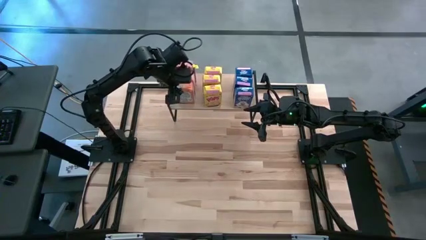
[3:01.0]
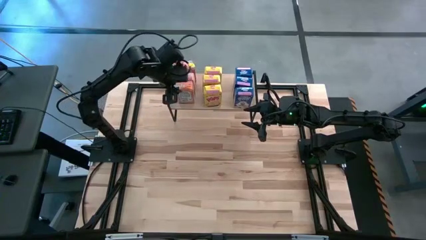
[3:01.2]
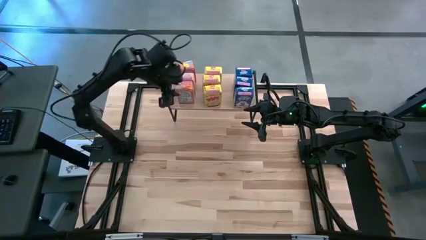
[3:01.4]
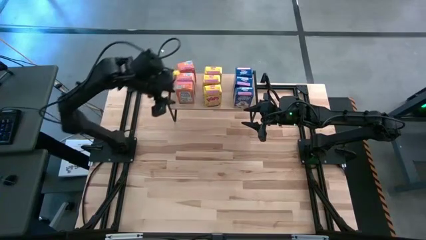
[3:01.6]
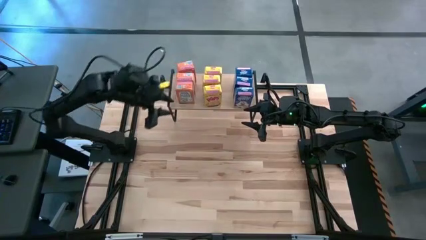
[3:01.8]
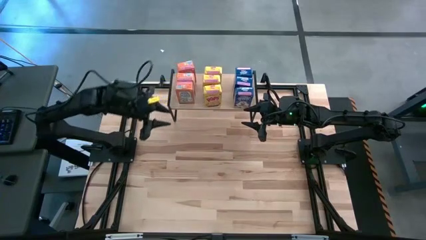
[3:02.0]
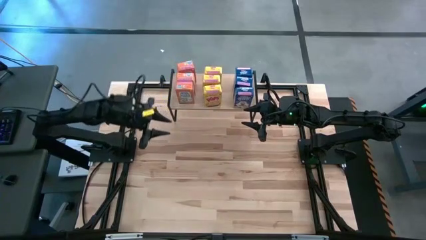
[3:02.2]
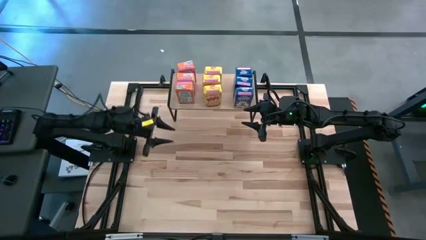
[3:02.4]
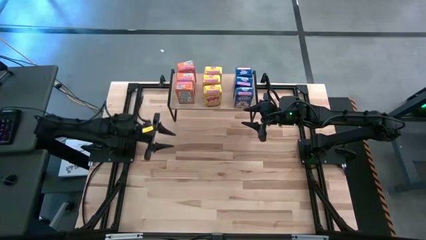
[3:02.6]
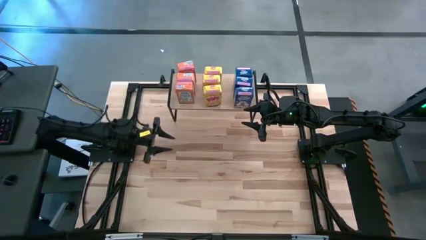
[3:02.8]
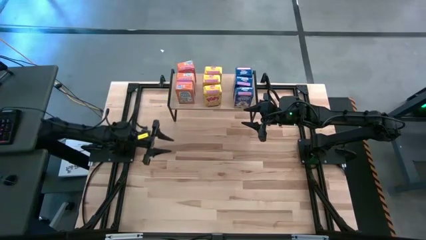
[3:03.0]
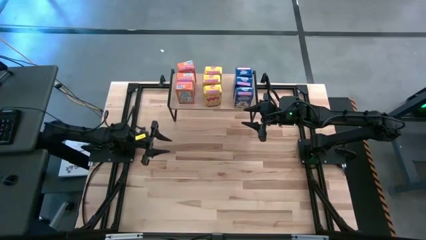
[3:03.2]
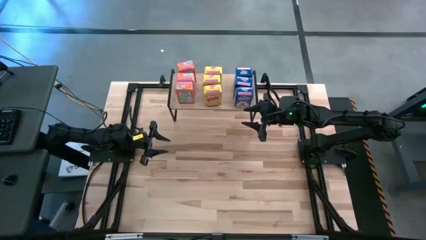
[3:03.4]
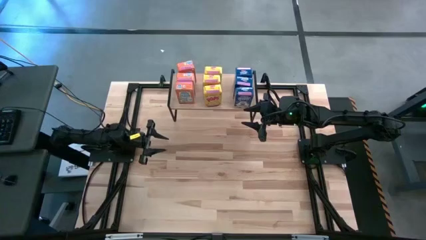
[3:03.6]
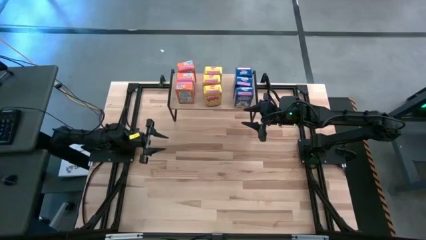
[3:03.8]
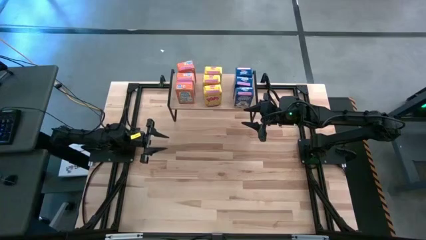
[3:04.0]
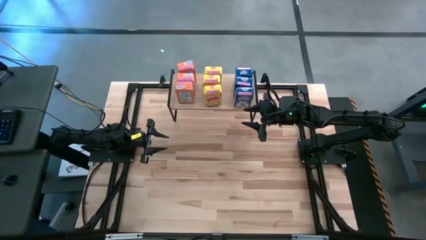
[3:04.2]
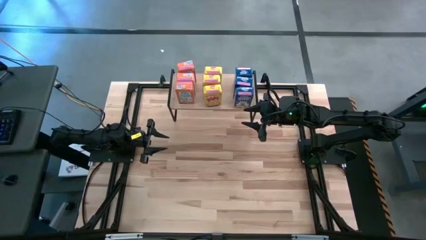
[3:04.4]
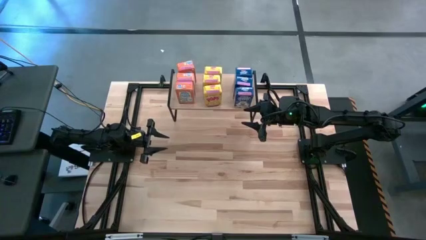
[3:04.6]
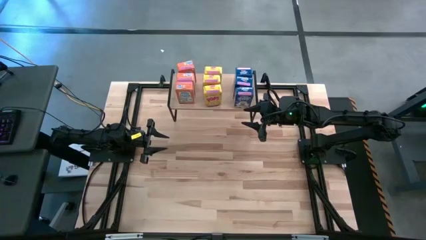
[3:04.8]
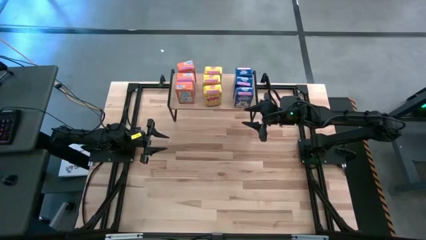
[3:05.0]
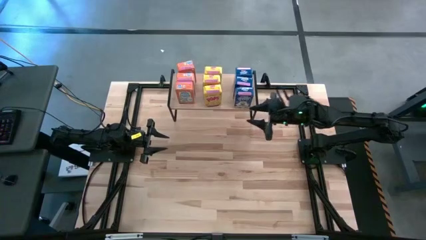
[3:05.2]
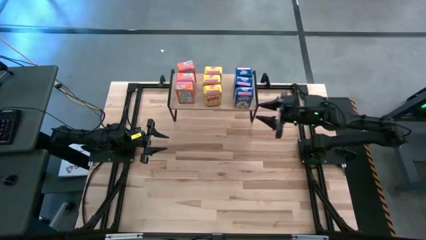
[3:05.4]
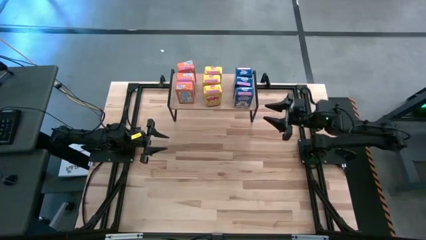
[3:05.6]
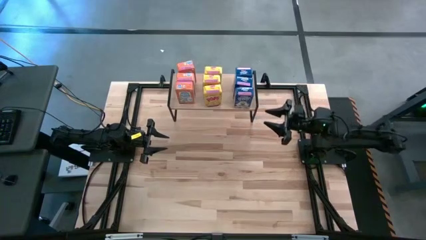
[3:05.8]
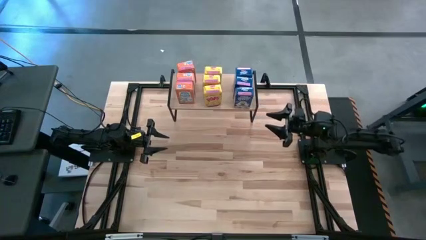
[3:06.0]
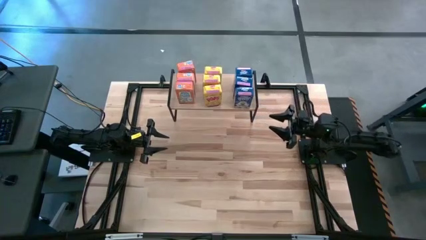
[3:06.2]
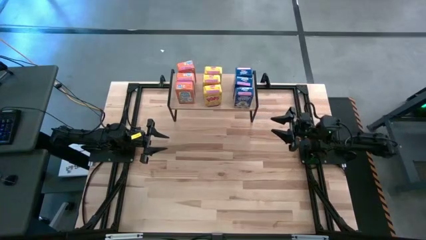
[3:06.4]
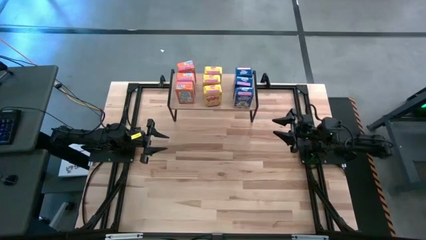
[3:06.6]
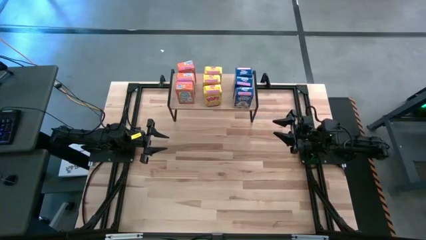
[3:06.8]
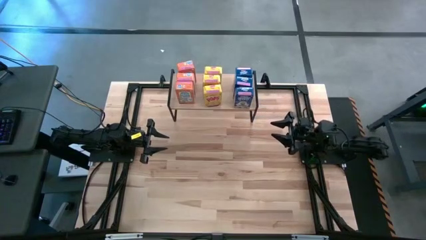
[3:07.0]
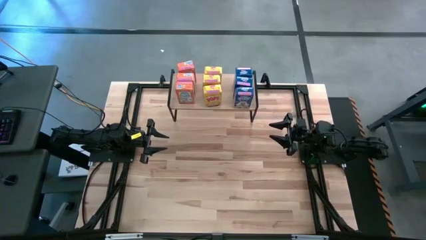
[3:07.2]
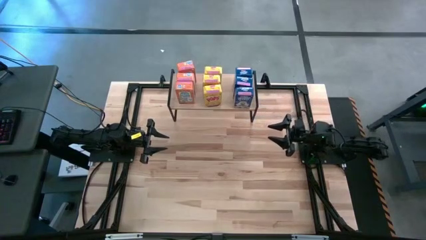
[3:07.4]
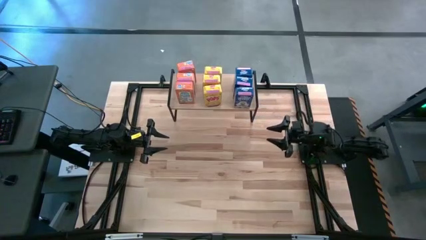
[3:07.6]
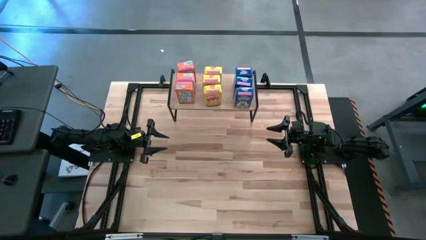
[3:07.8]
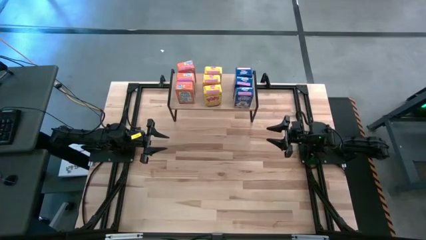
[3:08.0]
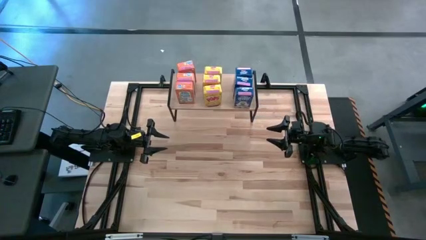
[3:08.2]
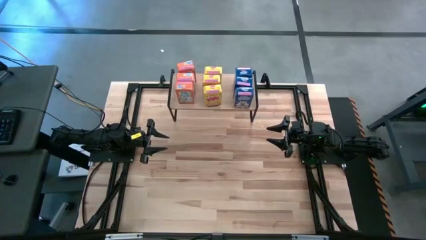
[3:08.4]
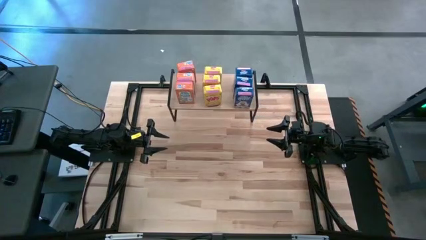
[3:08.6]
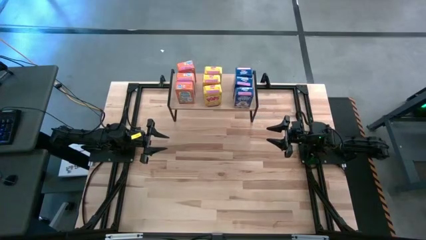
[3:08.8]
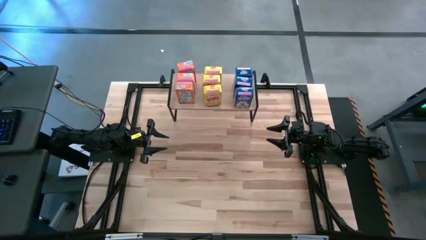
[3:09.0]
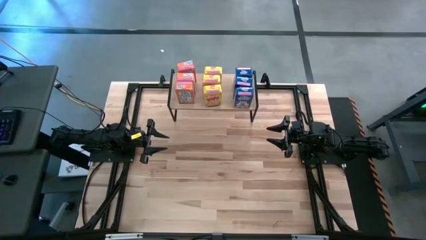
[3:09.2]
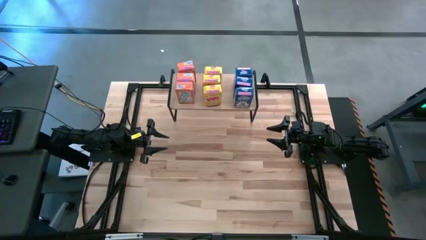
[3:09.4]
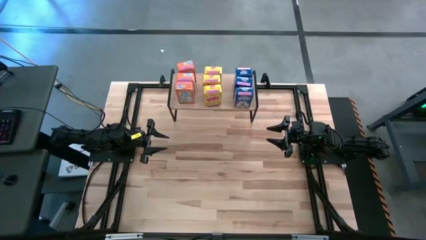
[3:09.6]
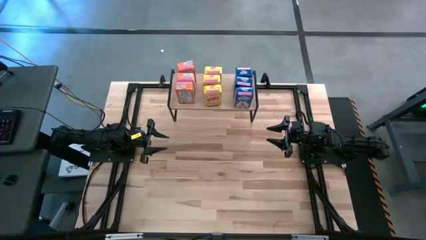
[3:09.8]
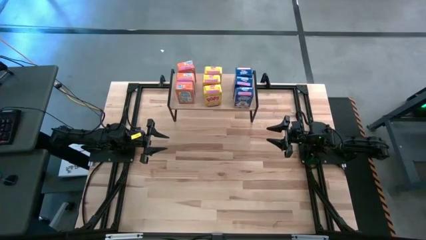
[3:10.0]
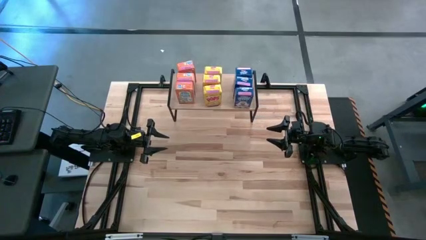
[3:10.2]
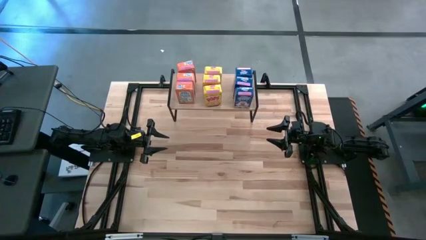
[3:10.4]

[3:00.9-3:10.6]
Task: Stack cereal on shelf
Return to Home Position
